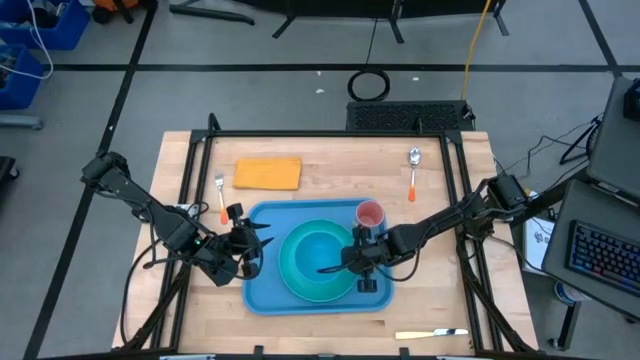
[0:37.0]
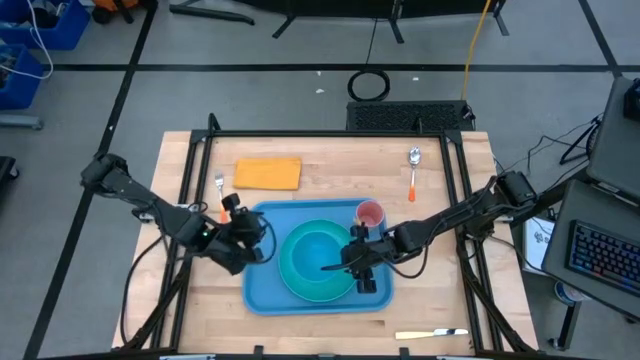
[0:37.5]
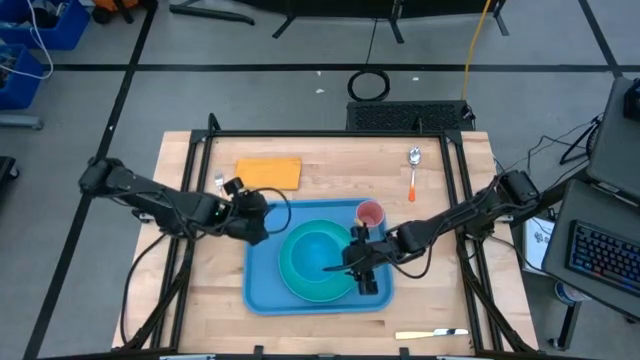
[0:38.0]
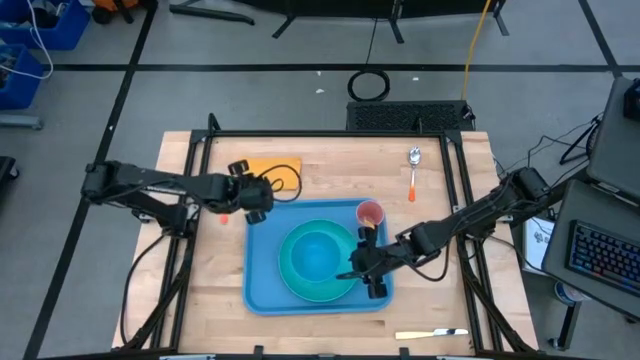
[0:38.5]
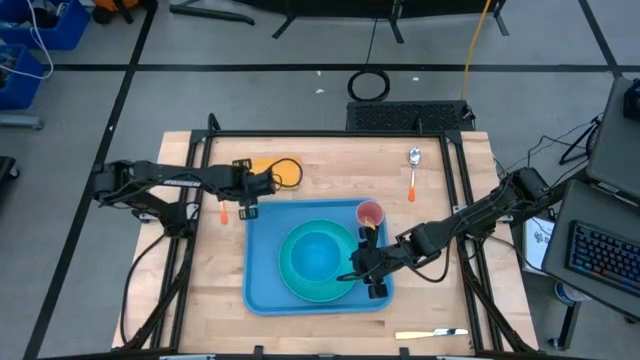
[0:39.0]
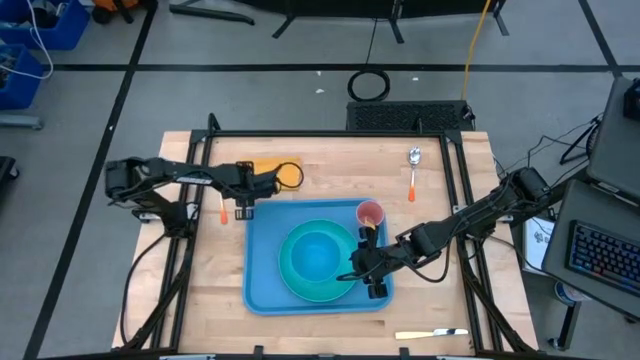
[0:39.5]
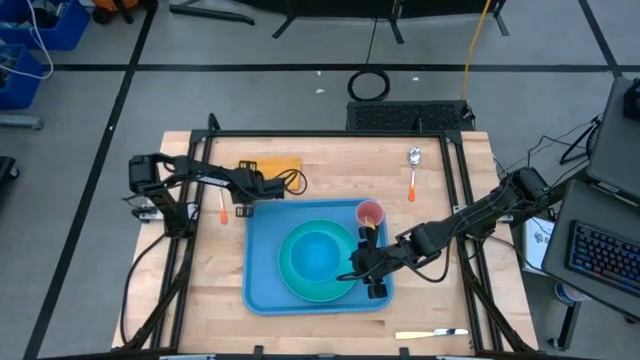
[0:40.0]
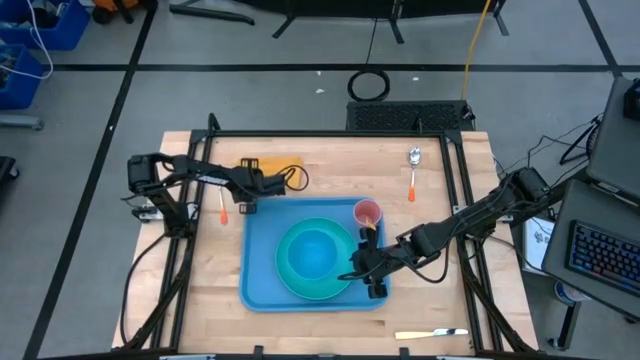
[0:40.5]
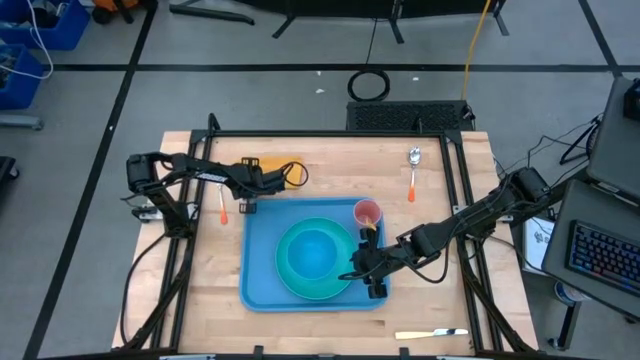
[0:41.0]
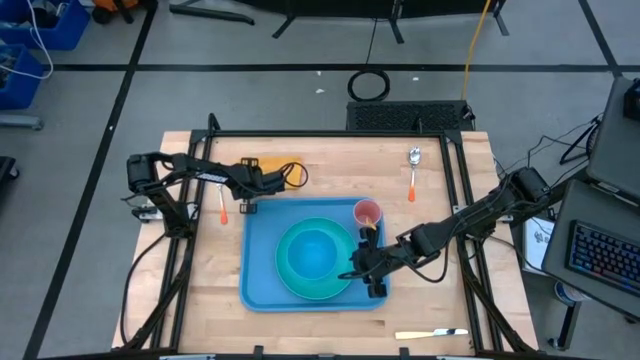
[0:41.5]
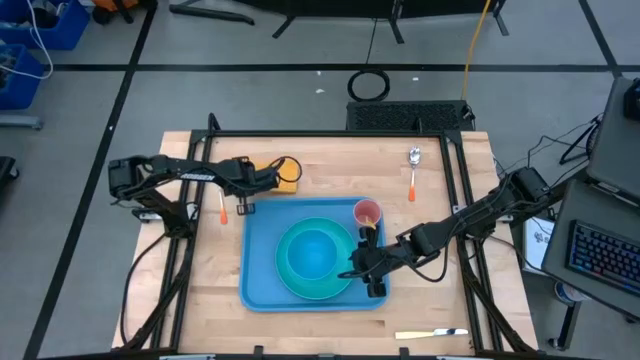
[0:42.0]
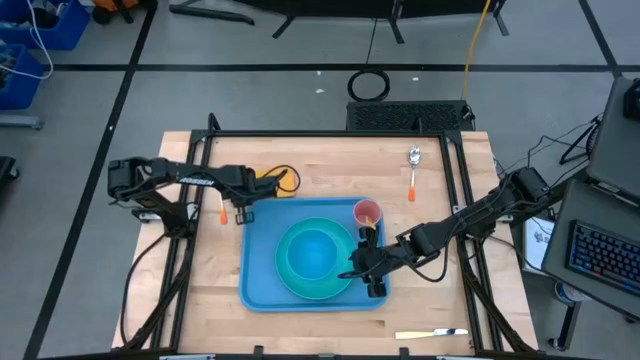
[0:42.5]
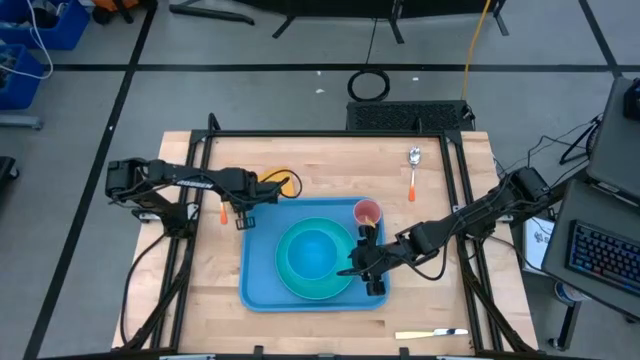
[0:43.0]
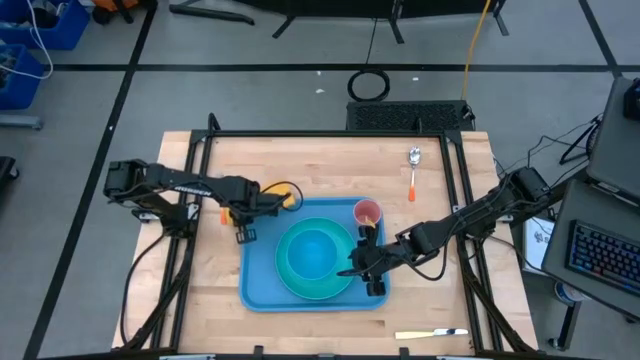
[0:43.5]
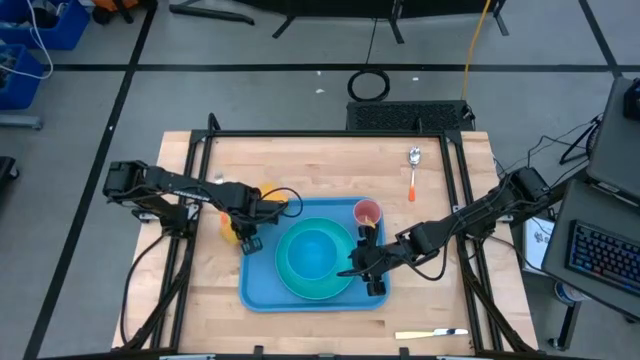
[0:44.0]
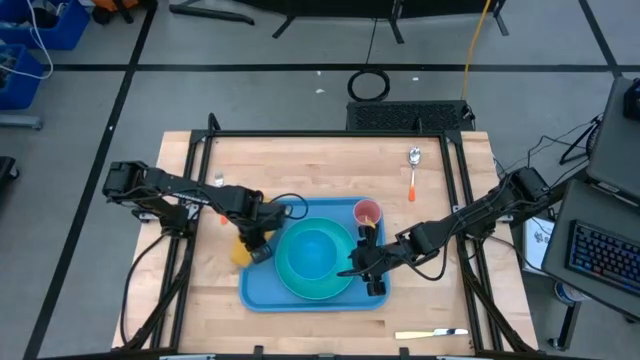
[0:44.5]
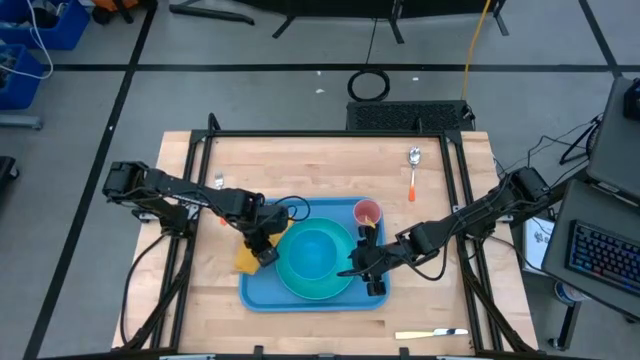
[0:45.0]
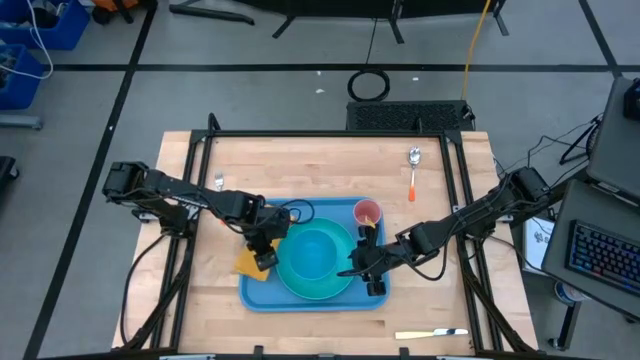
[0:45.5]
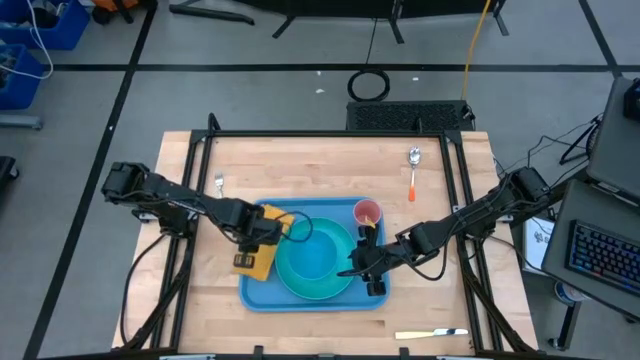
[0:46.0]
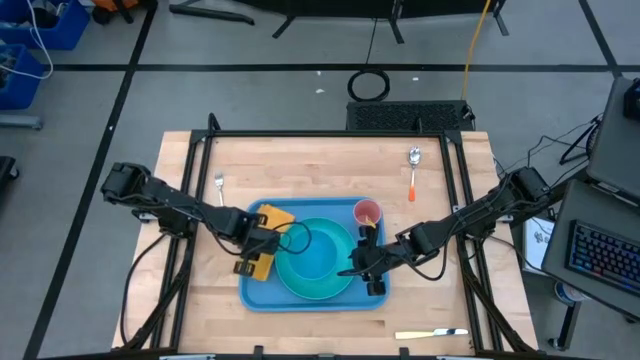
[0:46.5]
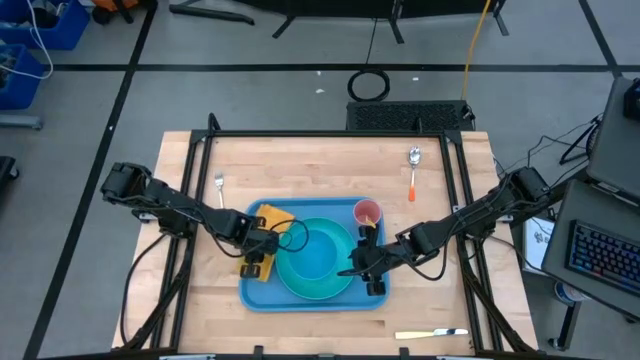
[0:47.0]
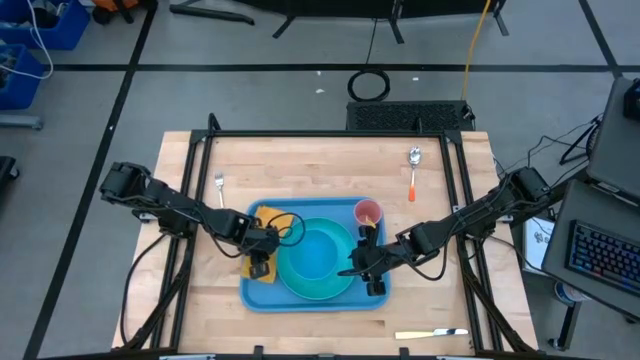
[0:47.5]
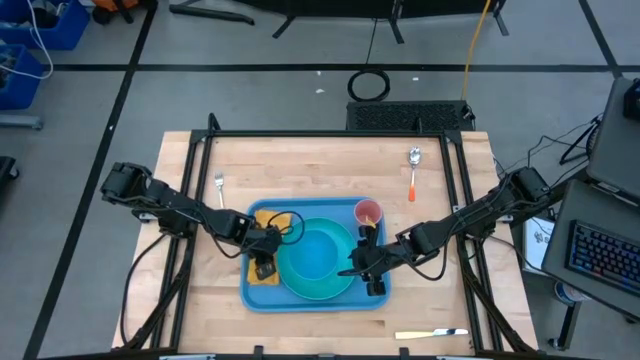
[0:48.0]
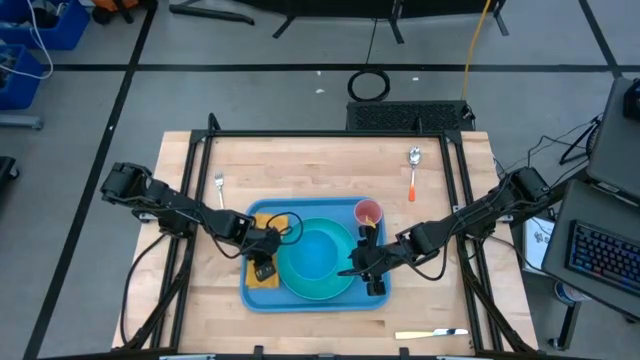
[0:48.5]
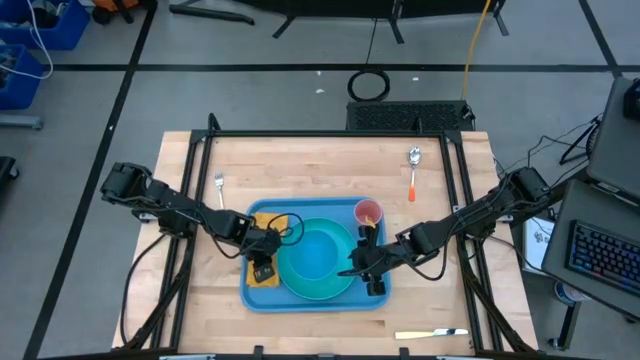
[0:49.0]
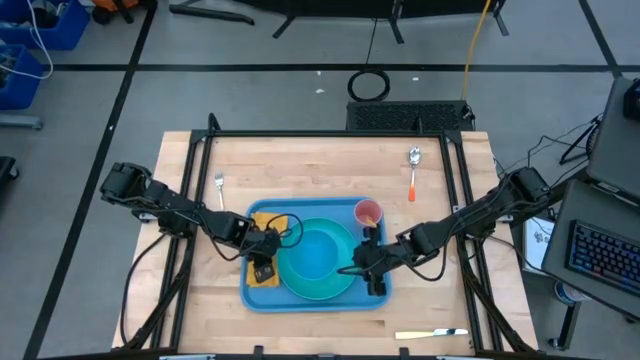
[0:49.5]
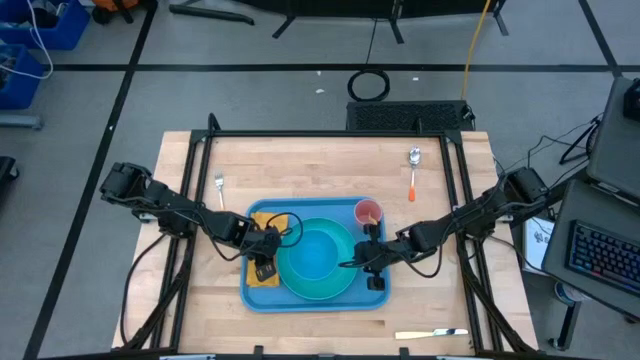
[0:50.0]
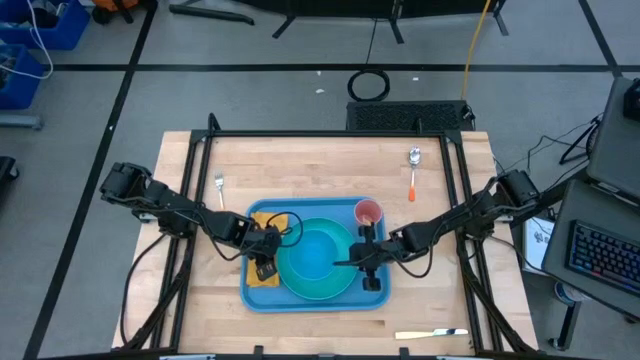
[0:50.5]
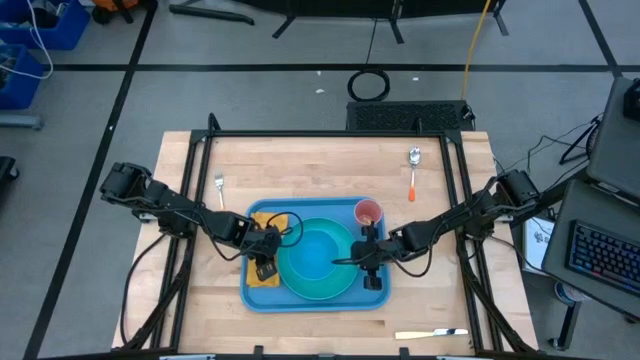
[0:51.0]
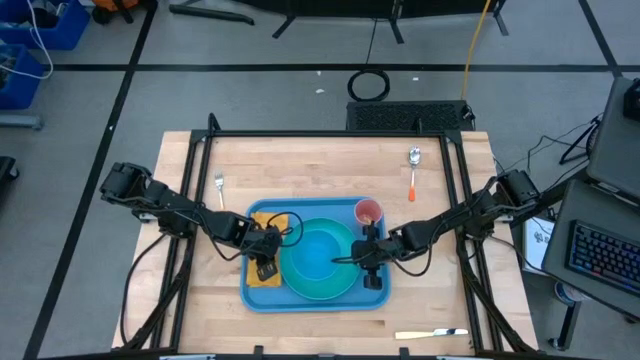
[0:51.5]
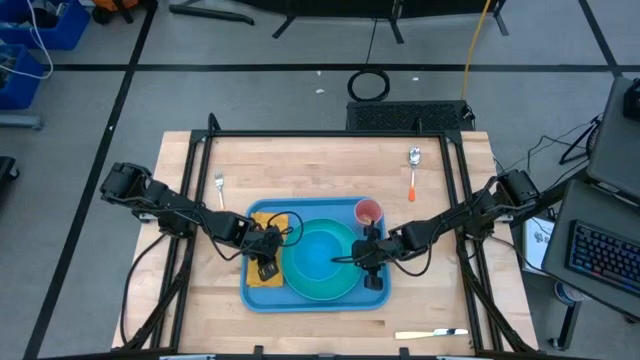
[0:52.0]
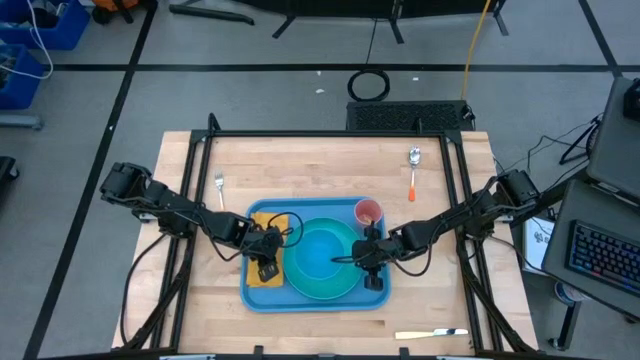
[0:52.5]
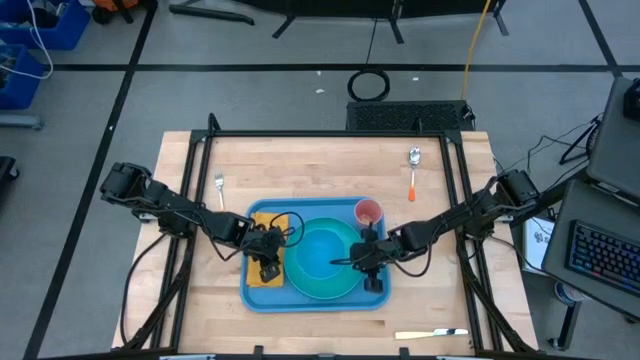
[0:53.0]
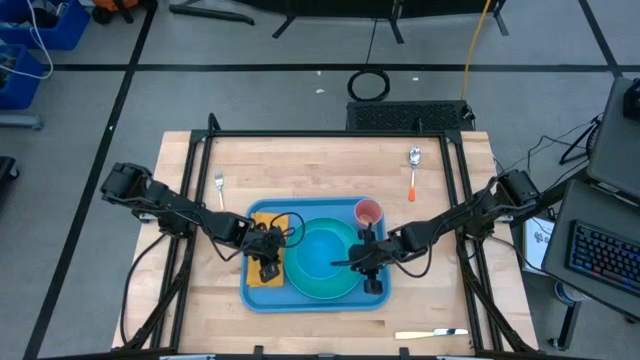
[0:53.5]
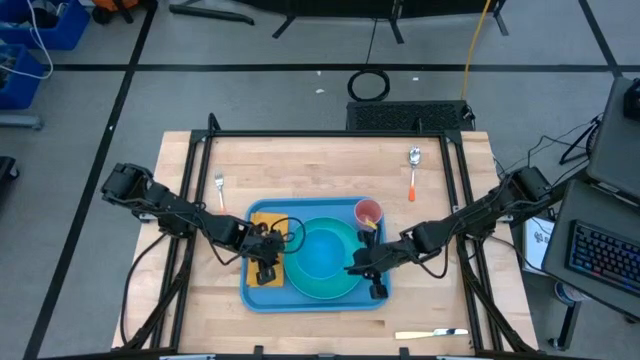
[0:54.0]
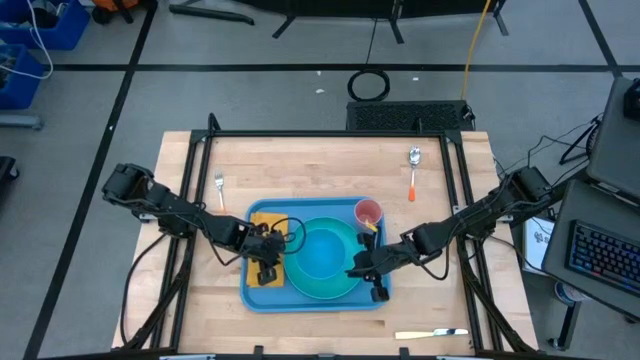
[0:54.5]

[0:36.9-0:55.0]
Task: Set up tray
Put the yellow napkin on top of the blue tray beside the green plate

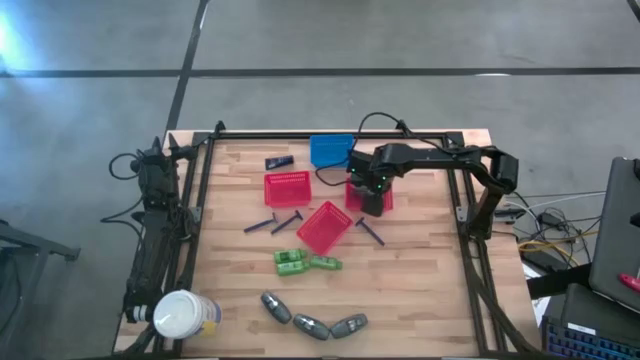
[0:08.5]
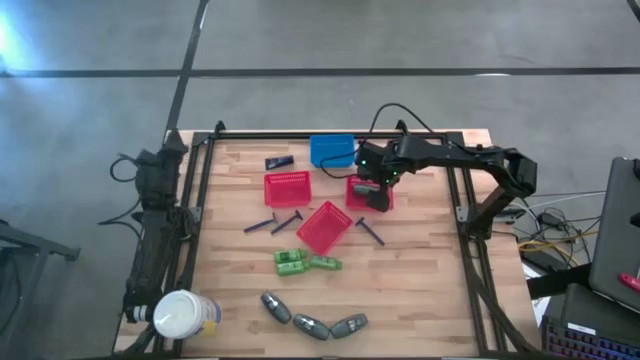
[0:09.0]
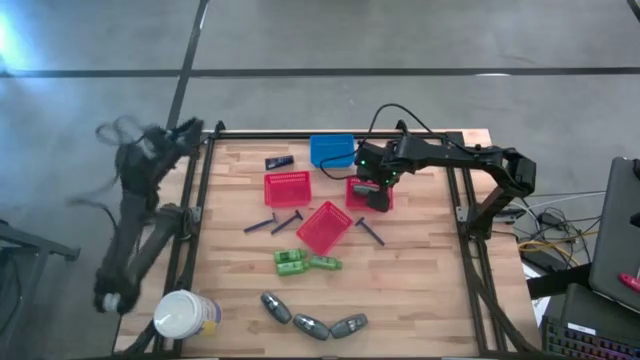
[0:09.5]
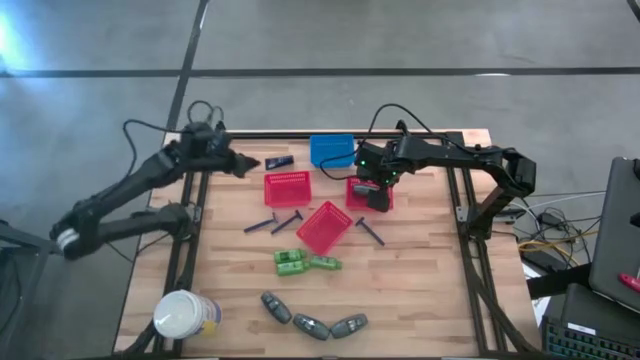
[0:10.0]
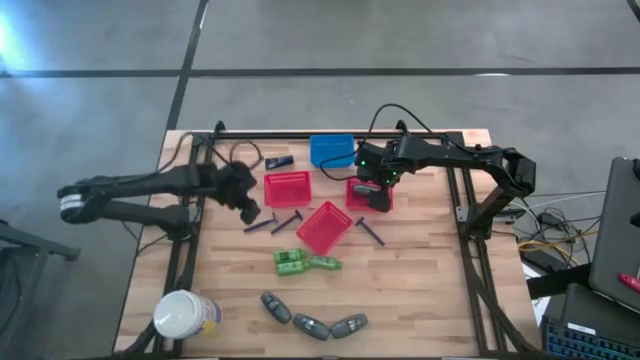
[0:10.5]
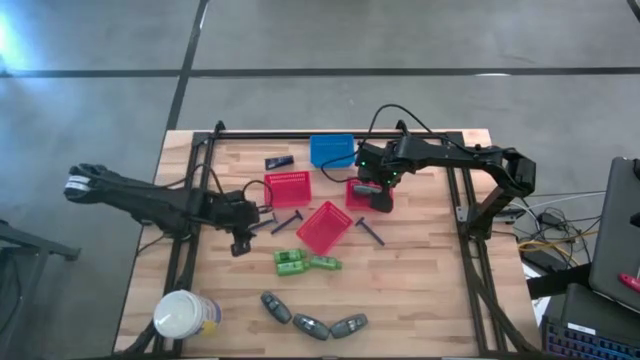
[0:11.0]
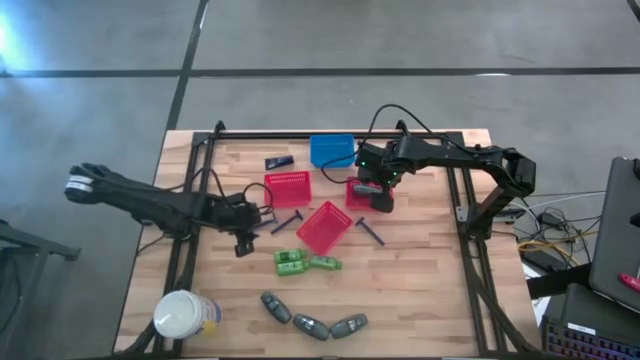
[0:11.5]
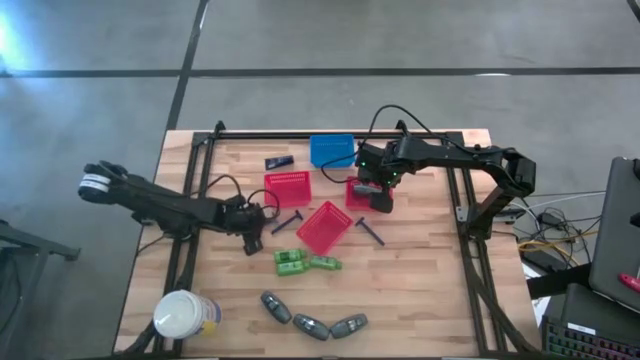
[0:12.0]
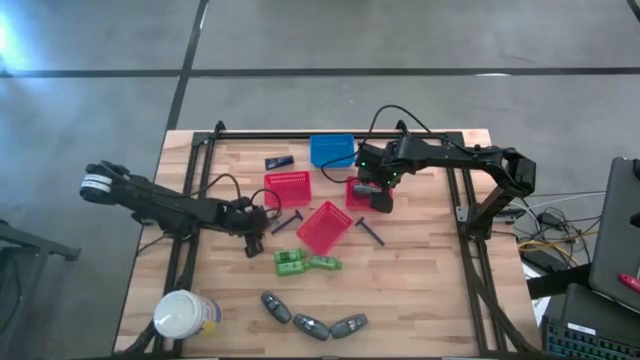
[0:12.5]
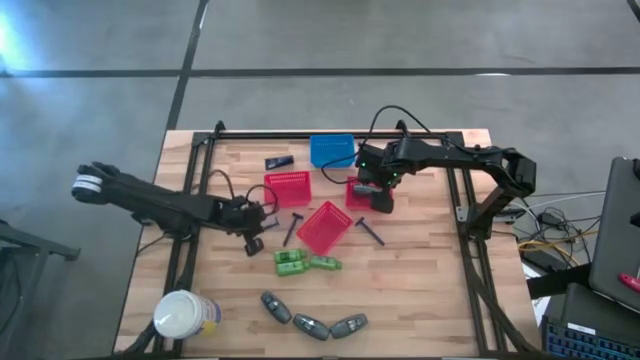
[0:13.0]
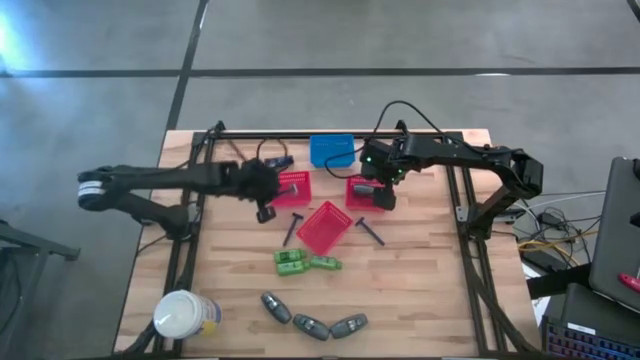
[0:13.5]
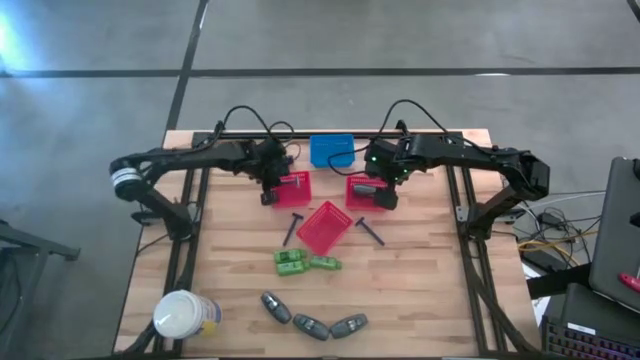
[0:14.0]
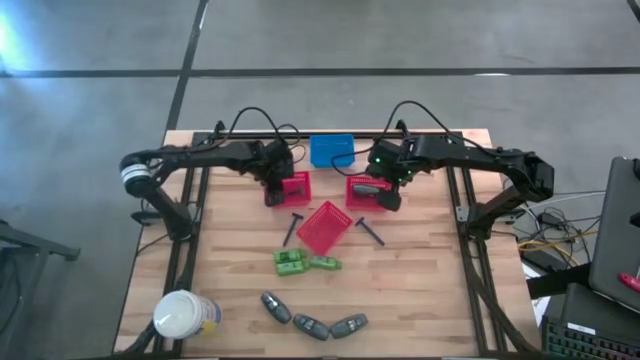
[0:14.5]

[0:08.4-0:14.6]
Task: Pick & Place Travel size toiletries
Put the blue razor into the top left red bin
